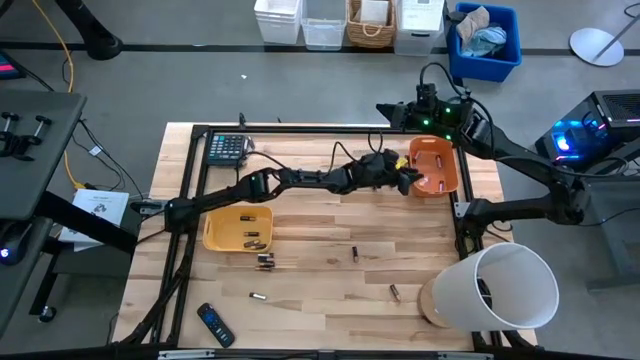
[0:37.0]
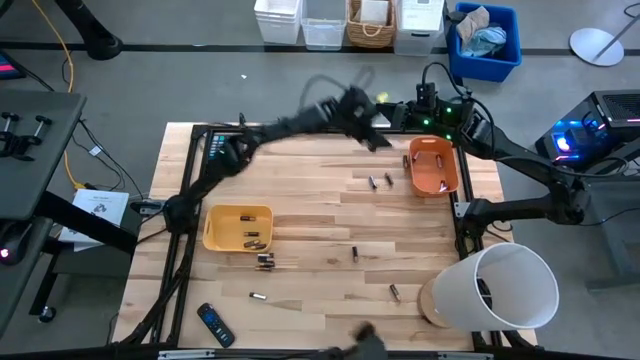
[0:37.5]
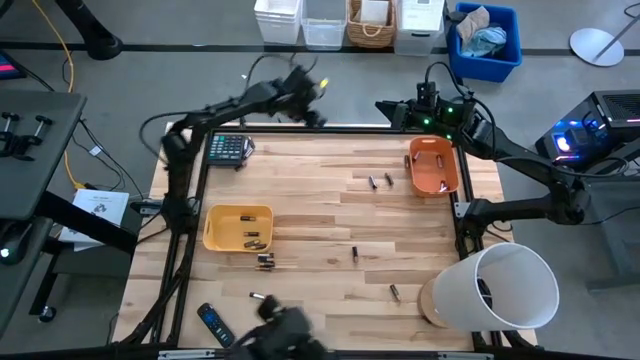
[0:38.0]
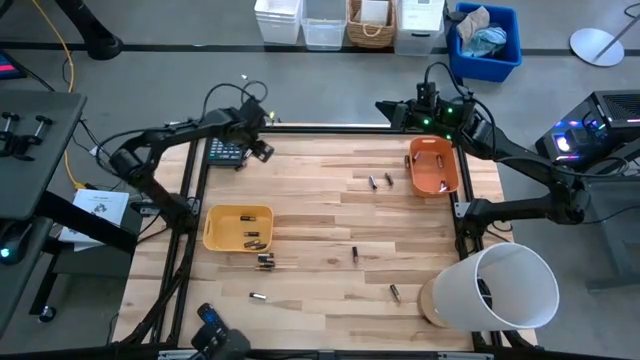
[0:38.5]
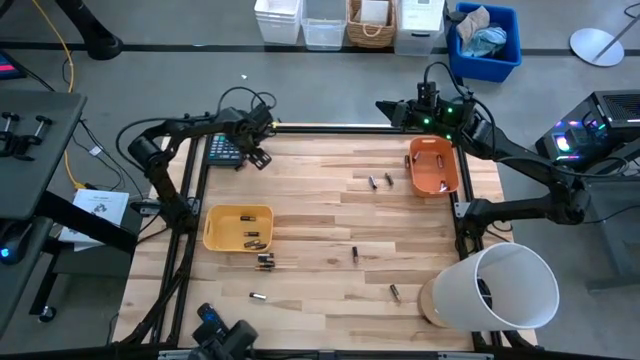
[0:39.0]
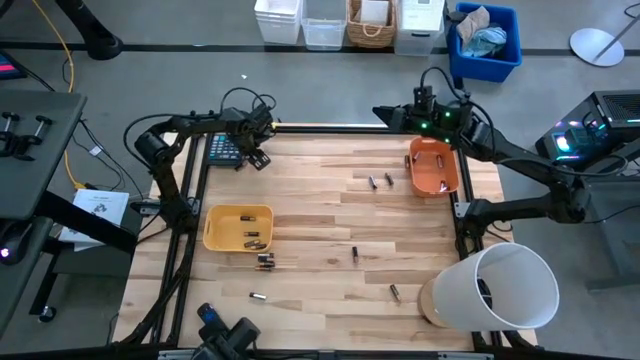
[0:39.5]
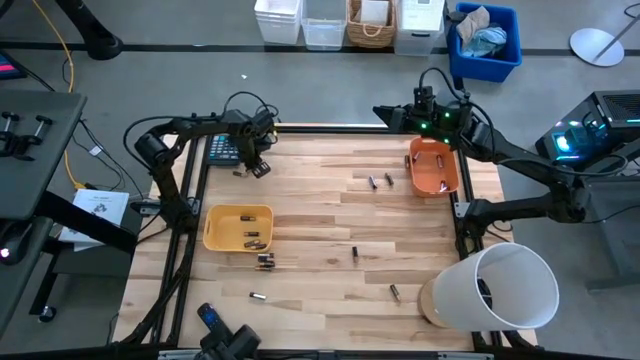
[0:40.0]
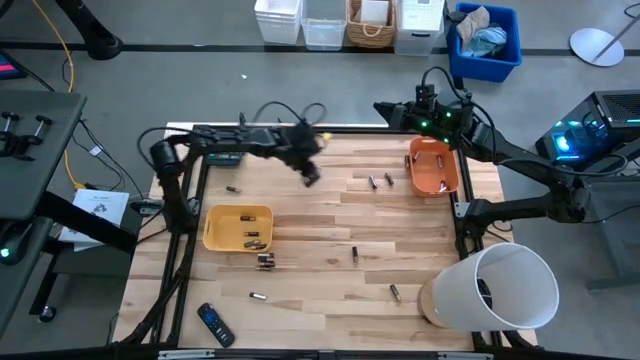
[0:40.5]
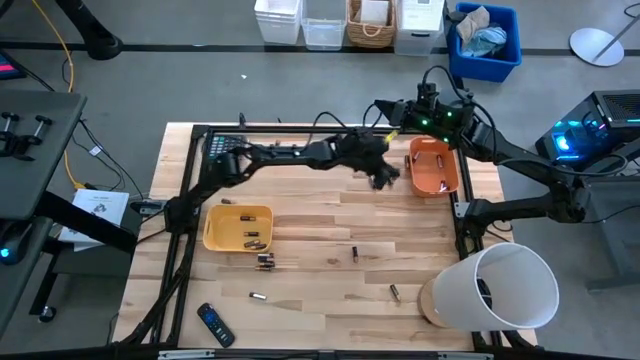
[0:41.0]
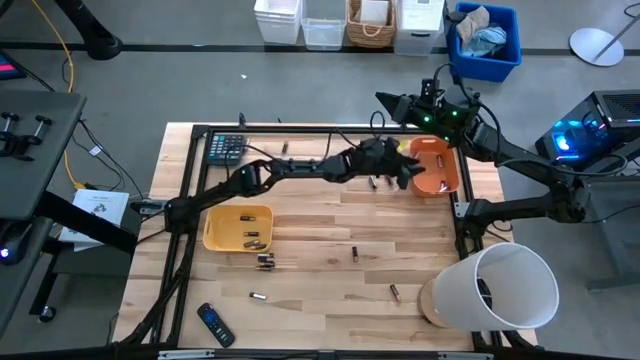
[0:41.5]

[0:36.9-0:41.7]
Task: Sort batteries
Put the silver battery into the orange bin

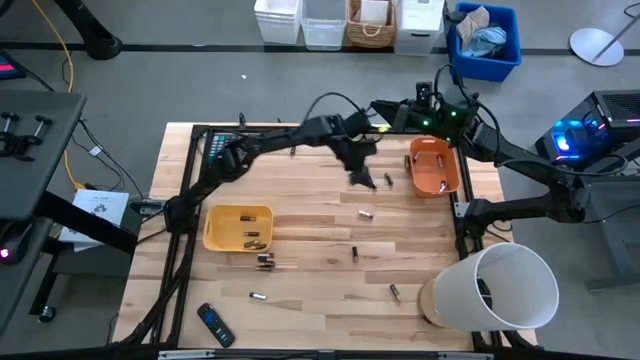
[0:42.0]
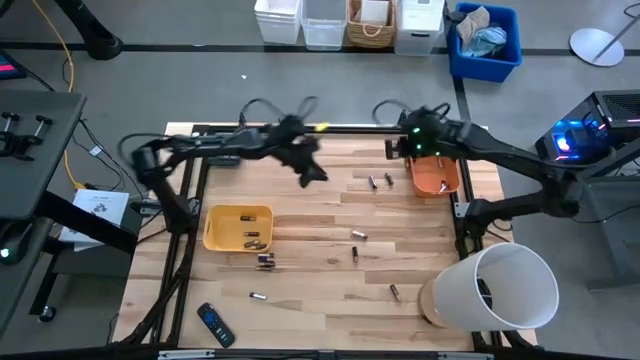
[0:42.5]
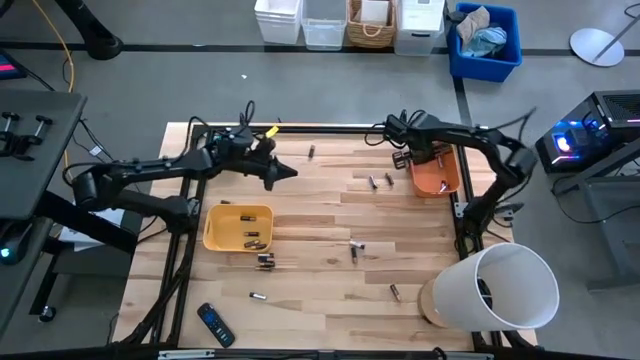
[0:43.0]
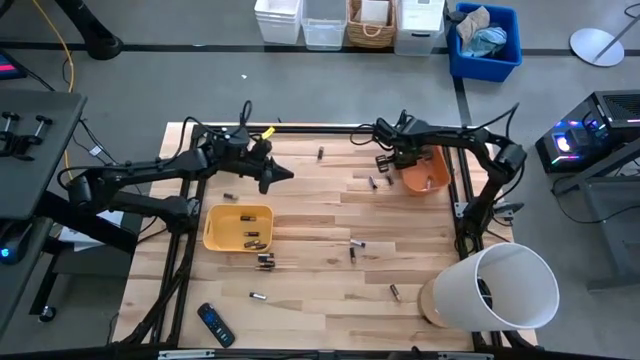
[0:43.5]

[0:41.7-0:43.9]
Adjust the orange bin

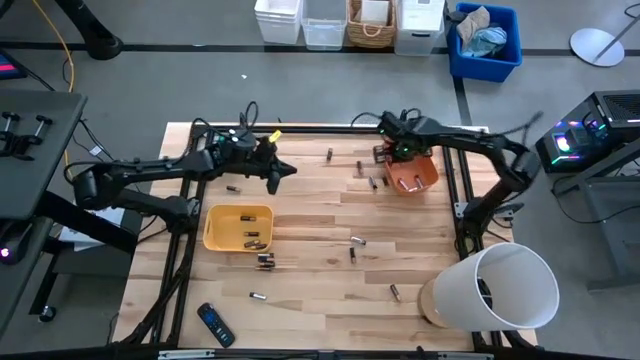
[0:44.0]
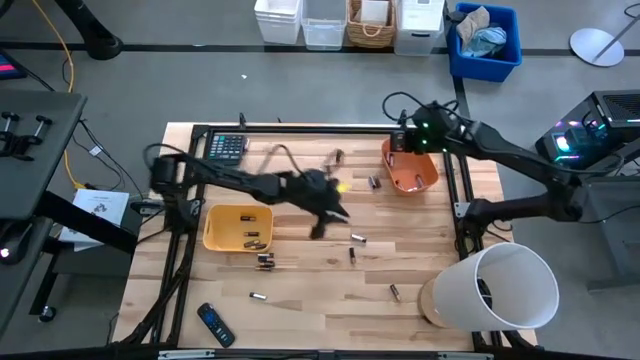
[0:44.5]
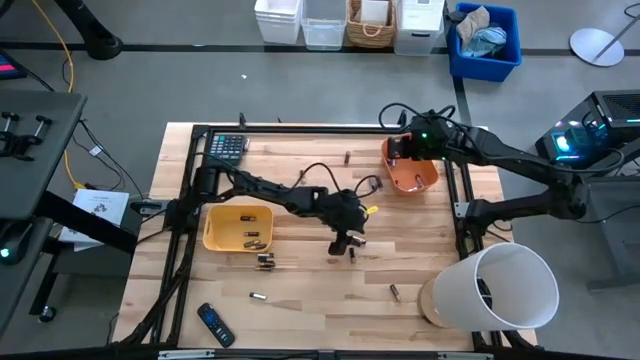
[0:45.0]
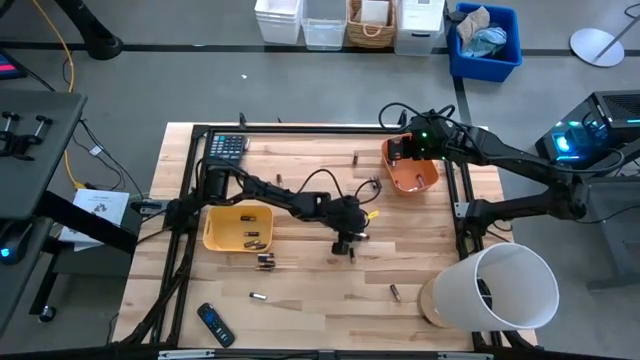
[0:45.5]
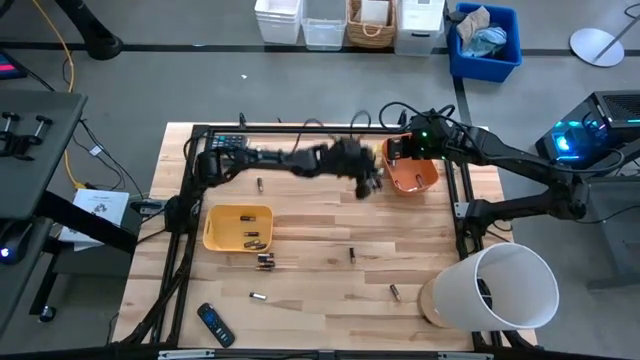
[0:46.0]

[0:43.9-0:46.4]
Put the silver battery into the orange bin

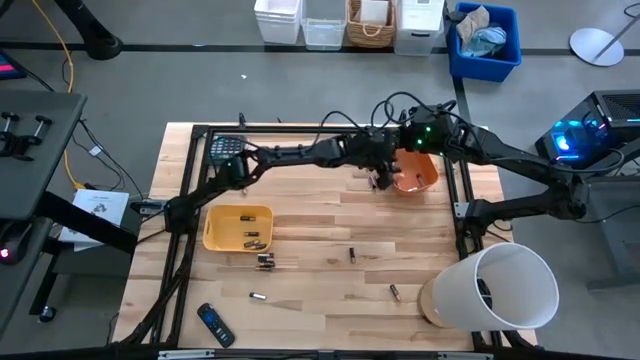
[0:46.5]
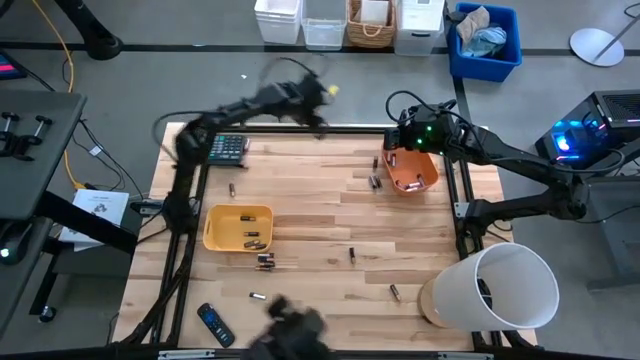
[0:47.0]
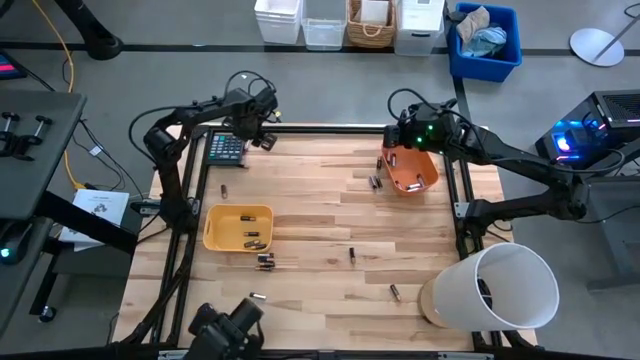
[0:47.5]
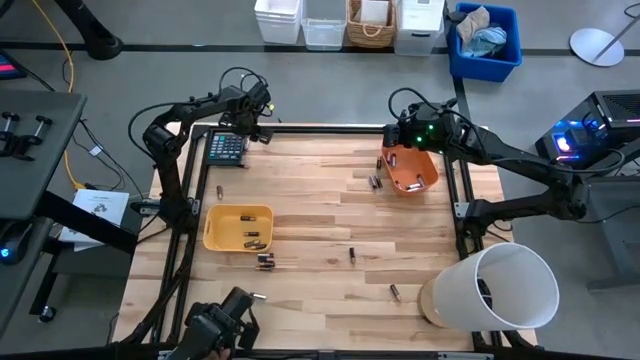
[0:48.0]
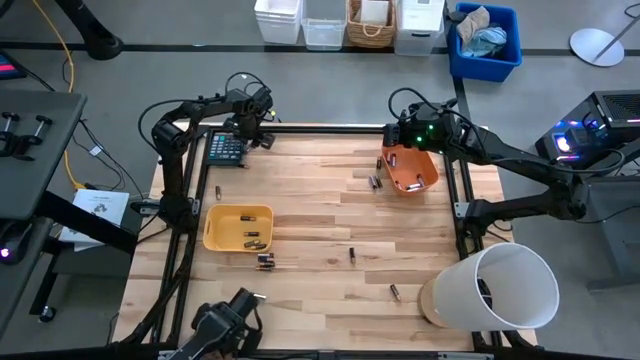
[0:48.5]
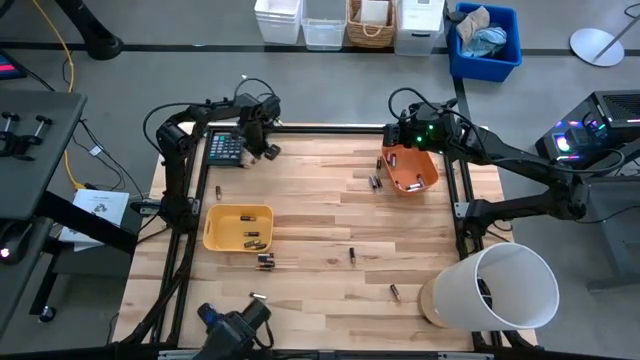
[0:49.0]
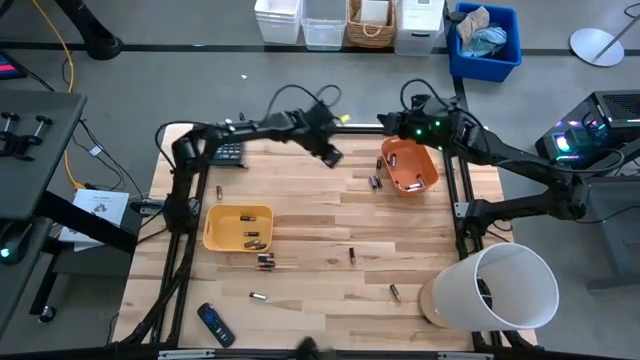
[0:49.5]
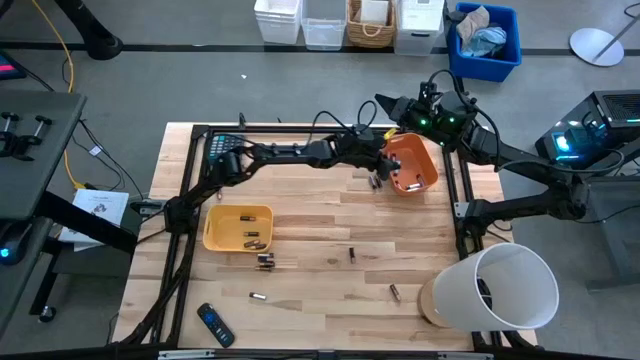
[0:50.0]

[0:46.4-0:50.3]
Put the silver battery into the orange bin

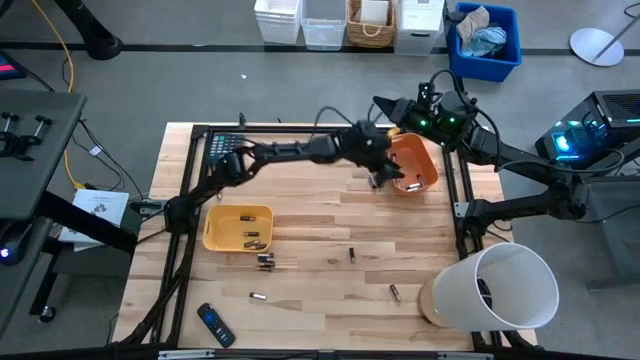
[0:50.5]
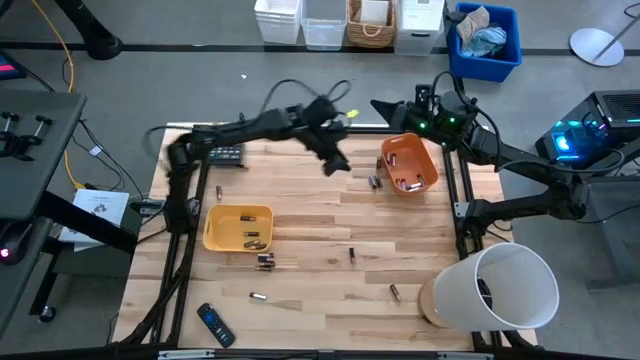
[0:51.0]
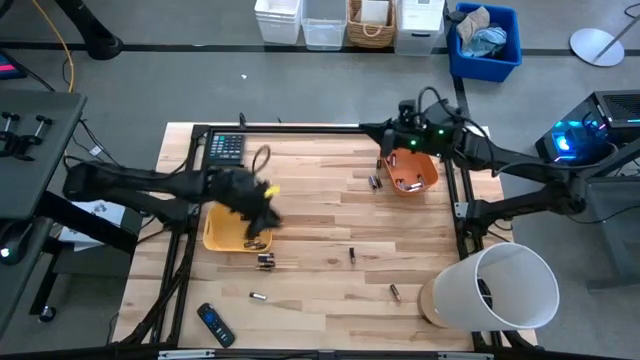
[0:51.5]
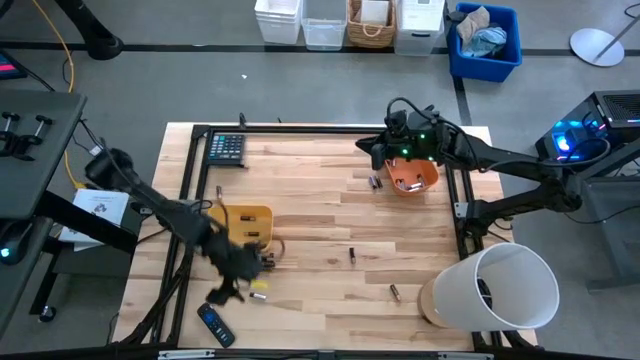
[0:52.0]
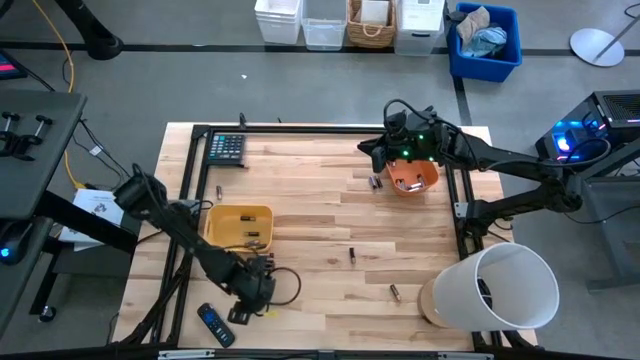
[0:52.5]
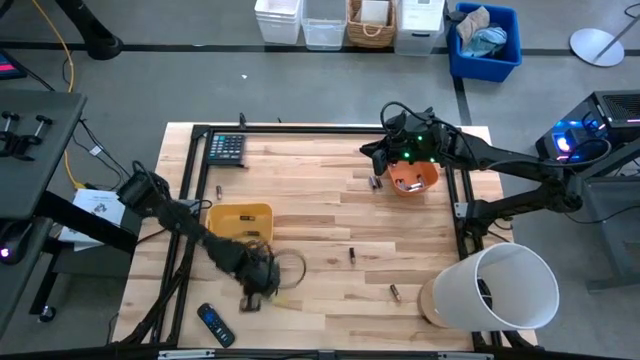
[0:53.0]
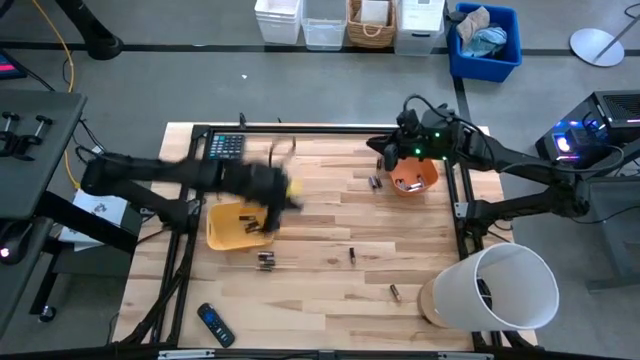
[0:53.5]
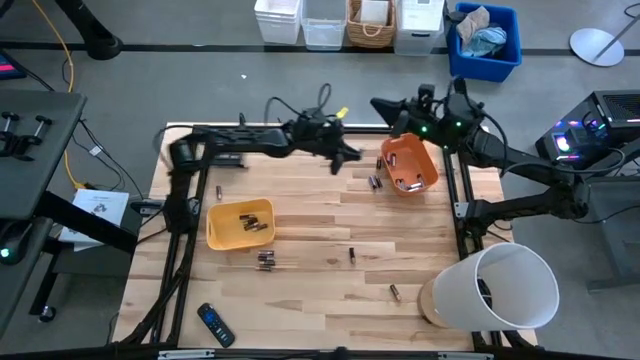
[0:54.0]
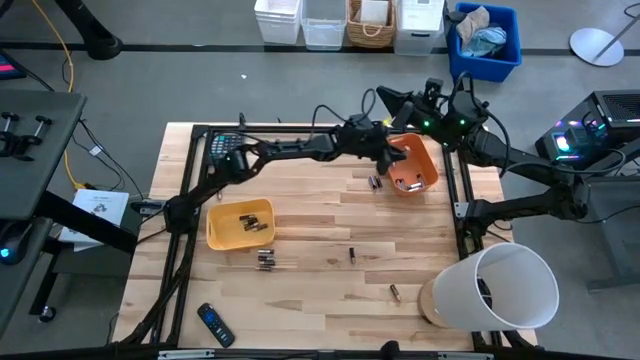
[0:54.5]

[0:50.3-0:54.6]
Put the silver battery into the orange bin

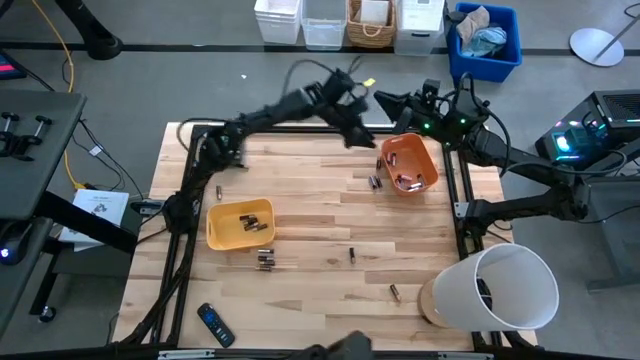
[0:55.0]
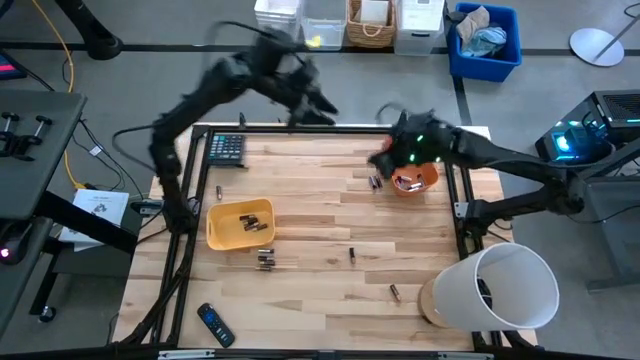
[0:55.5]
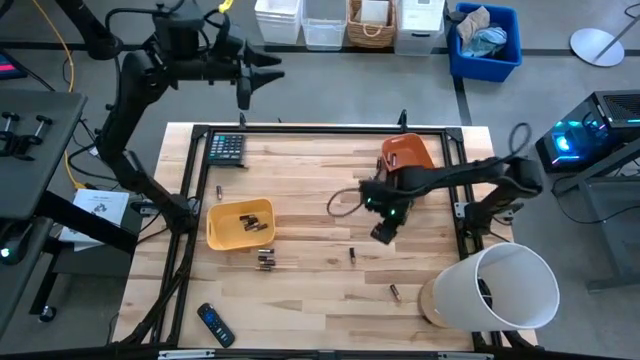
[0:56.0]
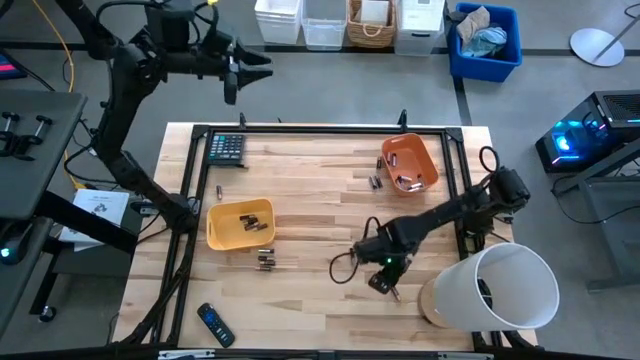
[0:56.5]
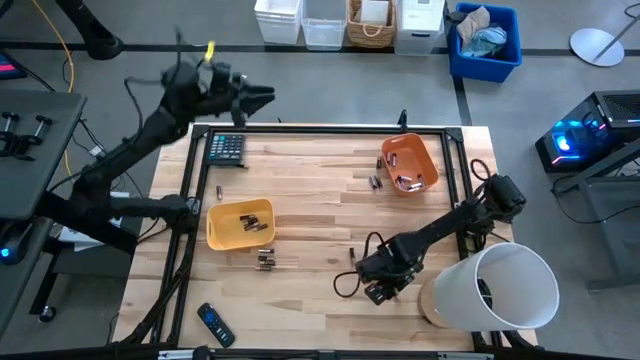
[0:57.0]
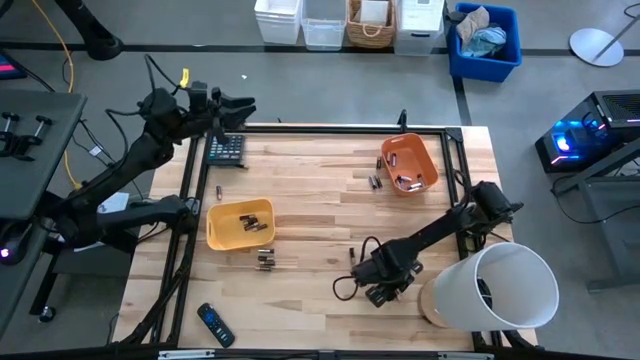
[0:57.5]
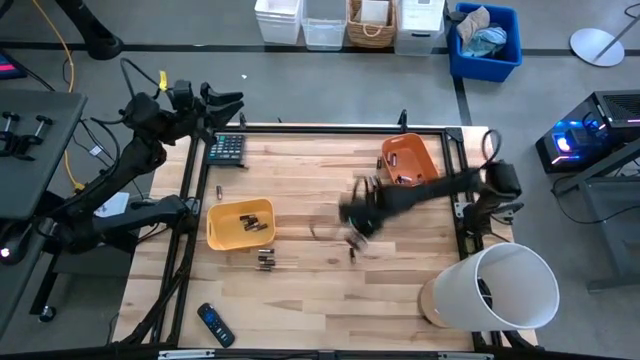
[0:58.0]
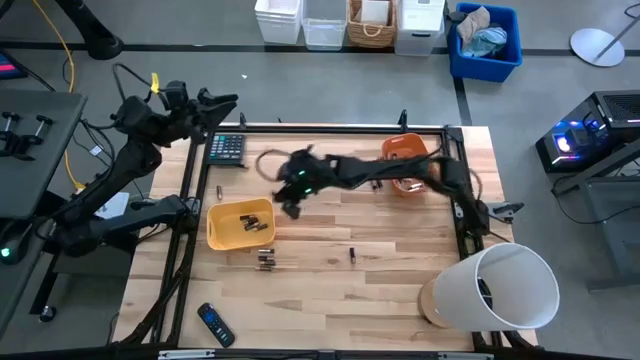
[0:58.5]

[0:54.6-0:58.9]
Put the black battery into the yellow bin
